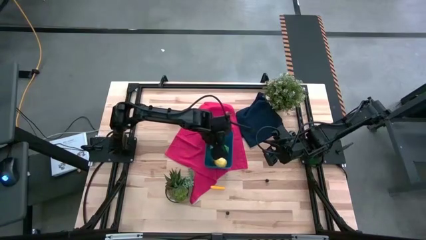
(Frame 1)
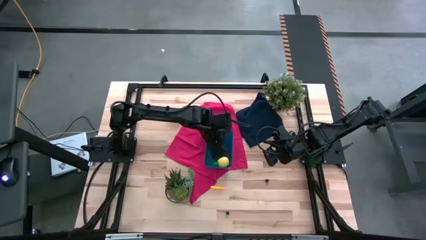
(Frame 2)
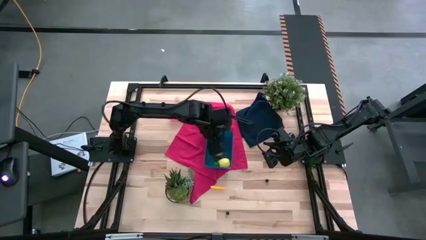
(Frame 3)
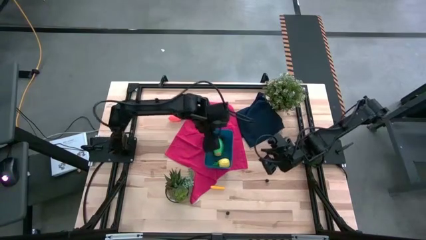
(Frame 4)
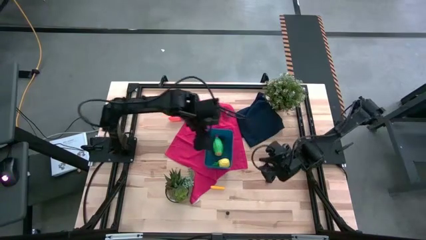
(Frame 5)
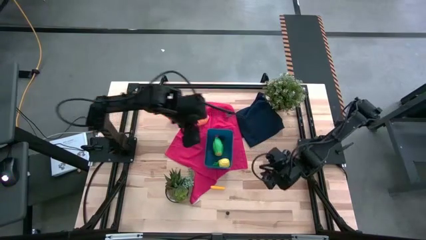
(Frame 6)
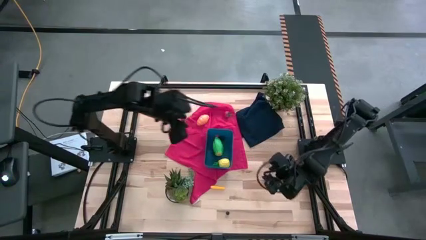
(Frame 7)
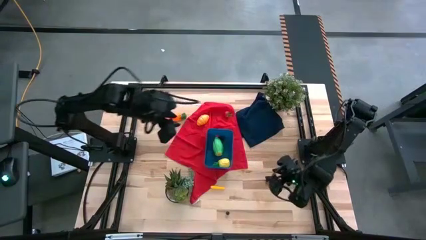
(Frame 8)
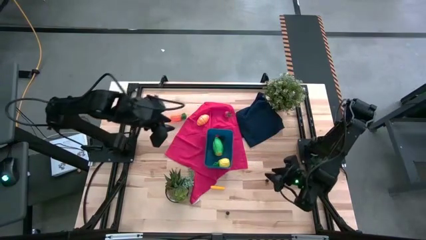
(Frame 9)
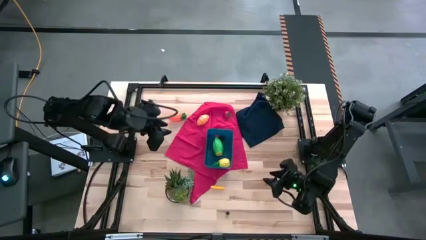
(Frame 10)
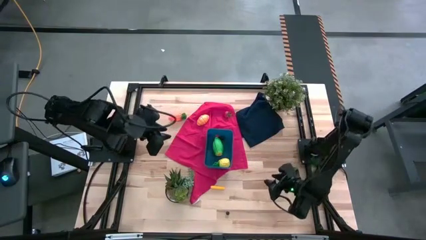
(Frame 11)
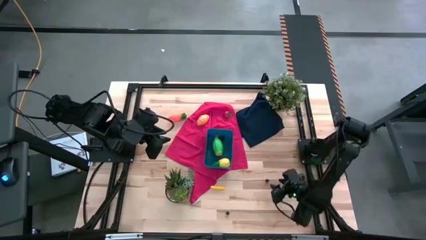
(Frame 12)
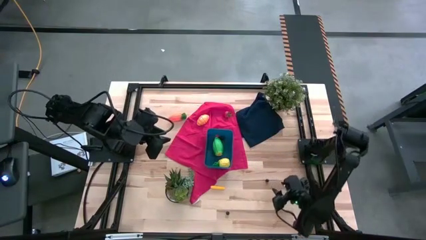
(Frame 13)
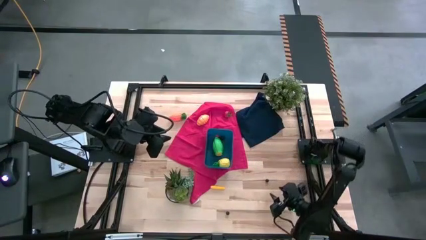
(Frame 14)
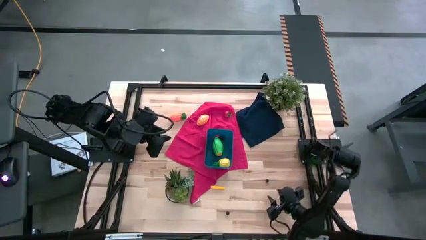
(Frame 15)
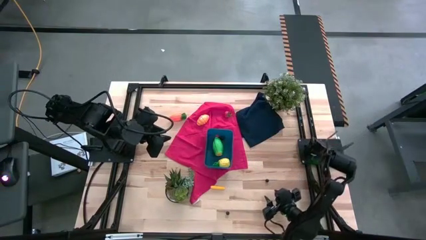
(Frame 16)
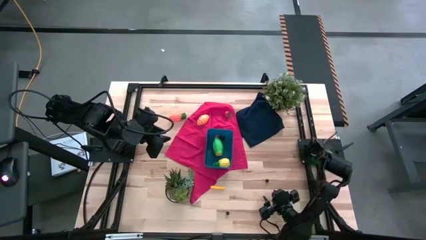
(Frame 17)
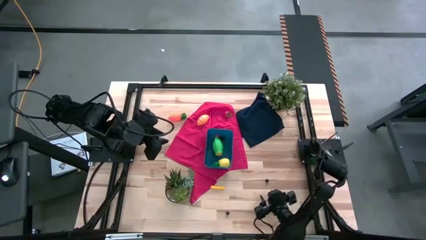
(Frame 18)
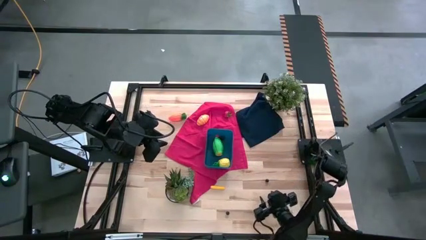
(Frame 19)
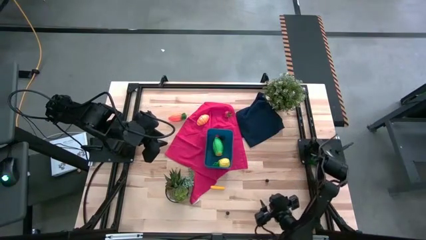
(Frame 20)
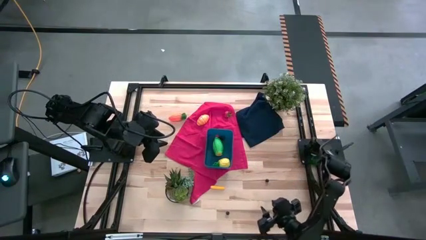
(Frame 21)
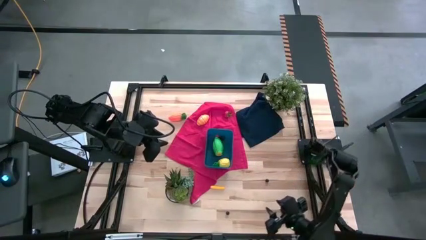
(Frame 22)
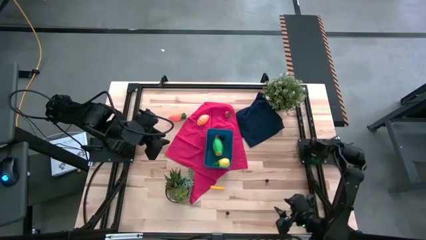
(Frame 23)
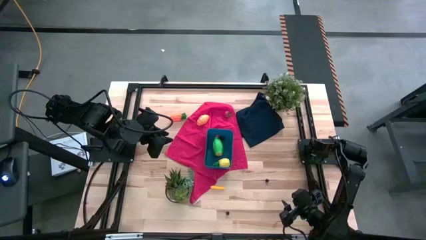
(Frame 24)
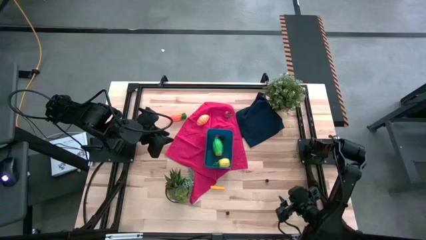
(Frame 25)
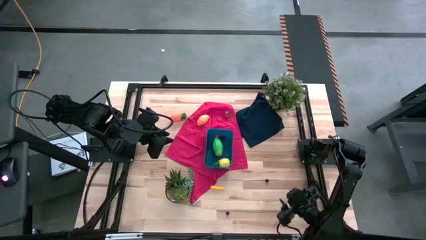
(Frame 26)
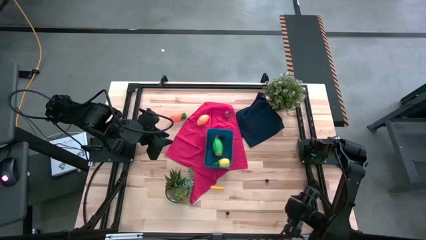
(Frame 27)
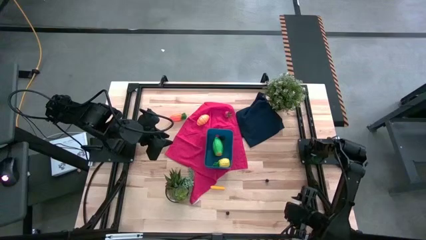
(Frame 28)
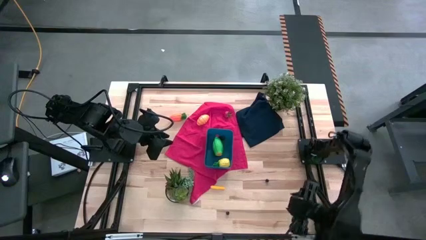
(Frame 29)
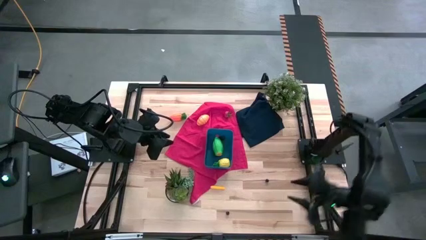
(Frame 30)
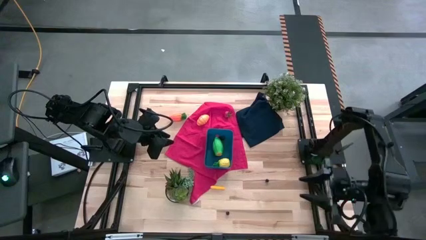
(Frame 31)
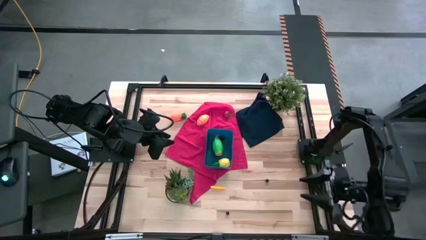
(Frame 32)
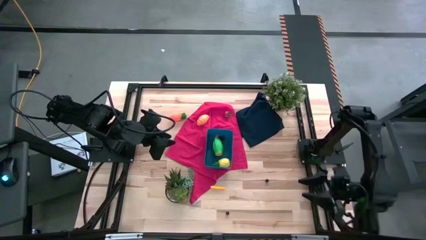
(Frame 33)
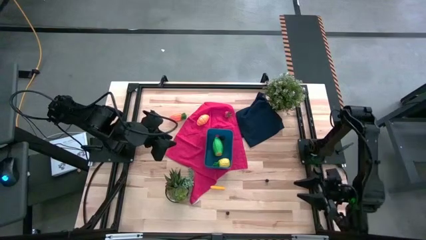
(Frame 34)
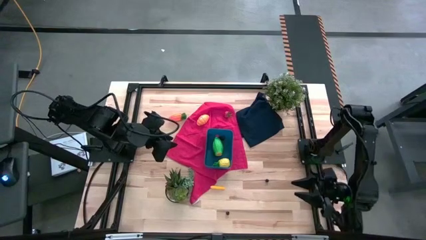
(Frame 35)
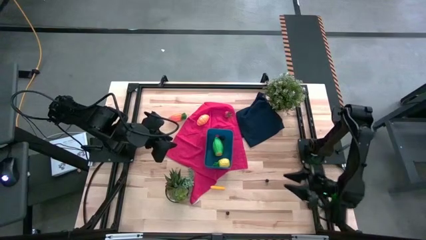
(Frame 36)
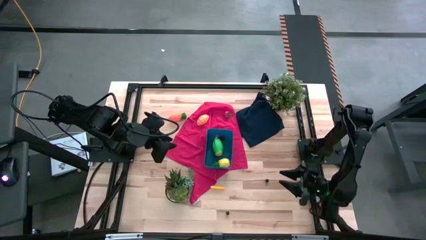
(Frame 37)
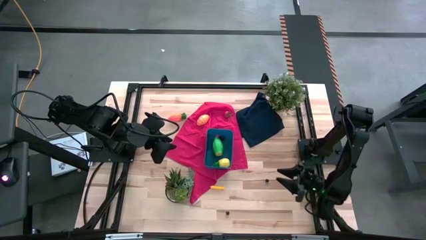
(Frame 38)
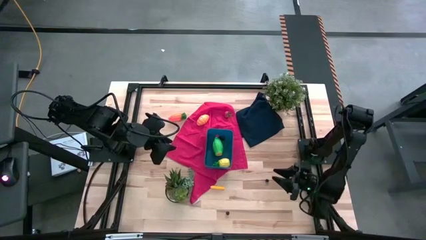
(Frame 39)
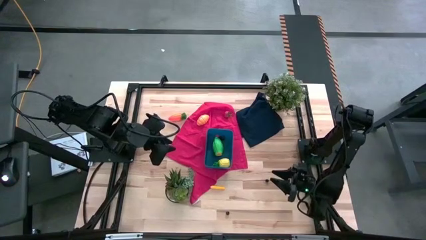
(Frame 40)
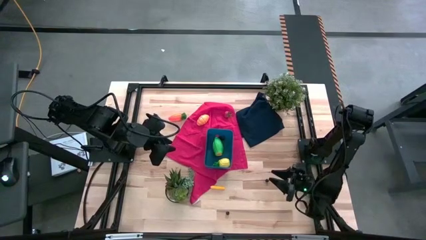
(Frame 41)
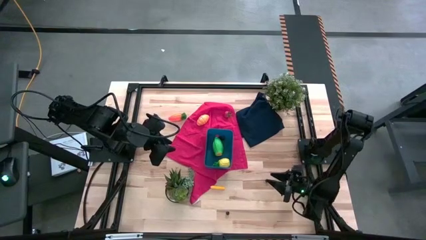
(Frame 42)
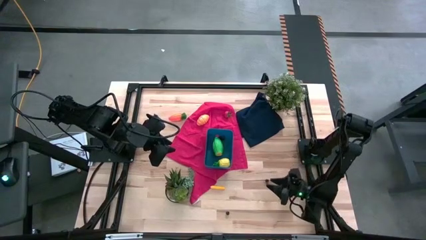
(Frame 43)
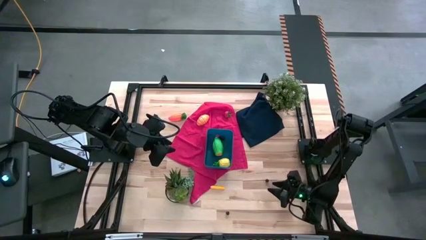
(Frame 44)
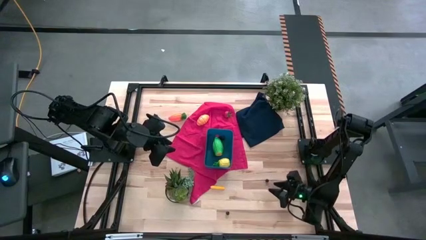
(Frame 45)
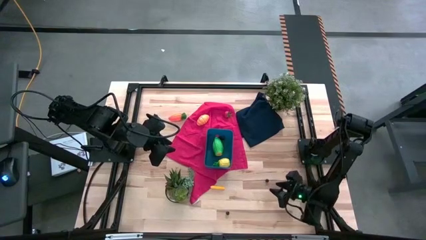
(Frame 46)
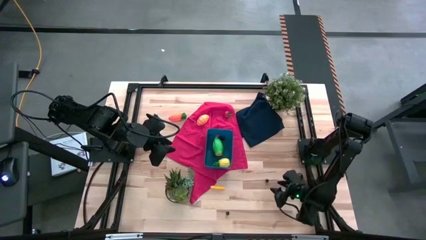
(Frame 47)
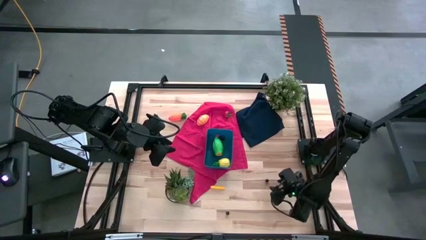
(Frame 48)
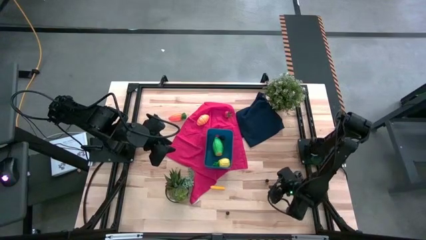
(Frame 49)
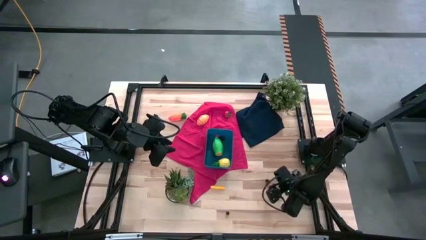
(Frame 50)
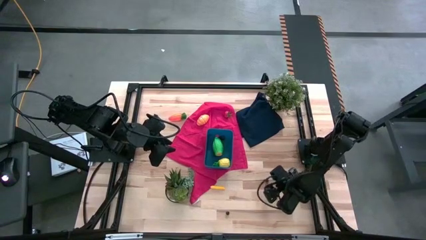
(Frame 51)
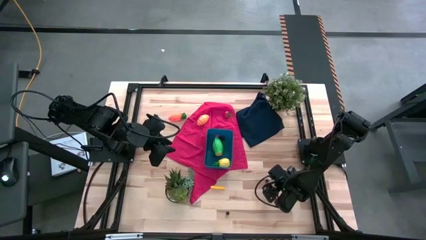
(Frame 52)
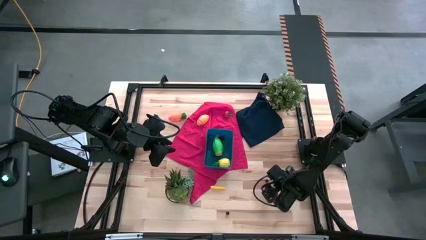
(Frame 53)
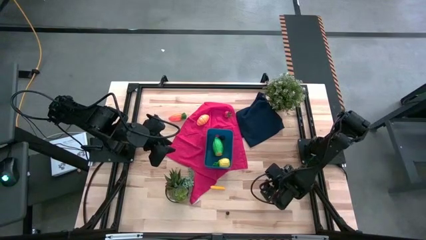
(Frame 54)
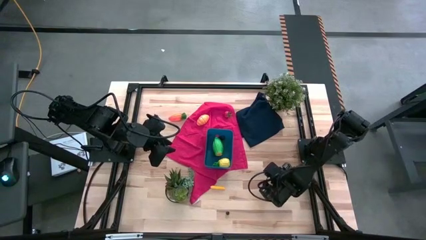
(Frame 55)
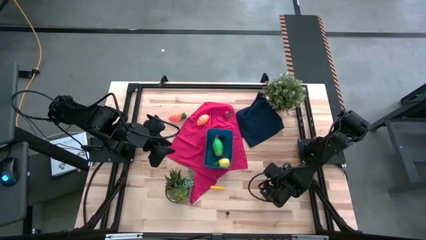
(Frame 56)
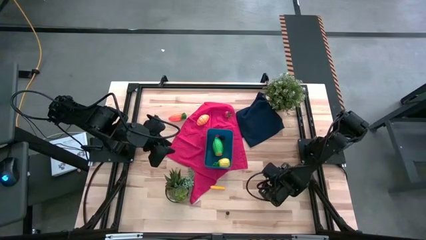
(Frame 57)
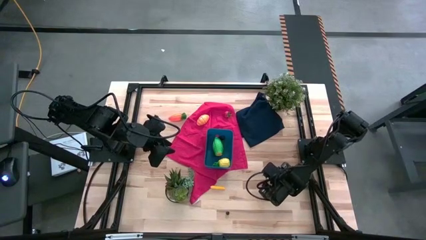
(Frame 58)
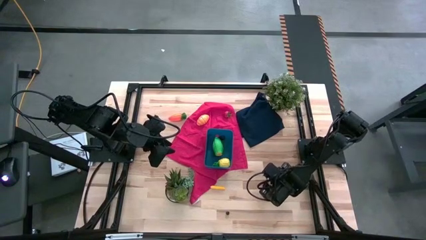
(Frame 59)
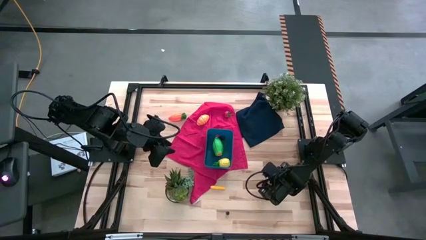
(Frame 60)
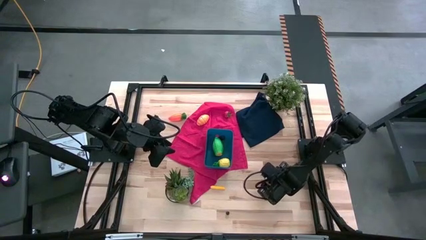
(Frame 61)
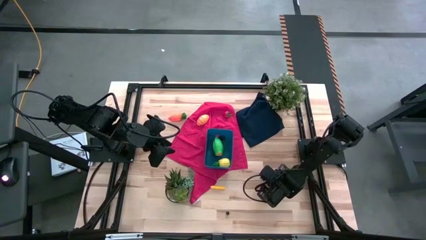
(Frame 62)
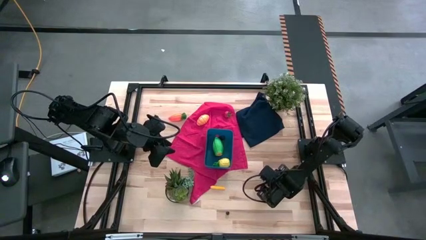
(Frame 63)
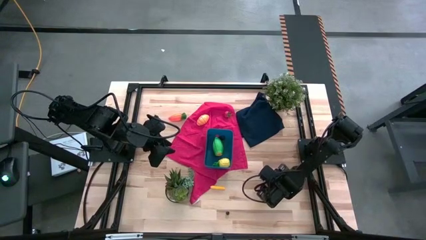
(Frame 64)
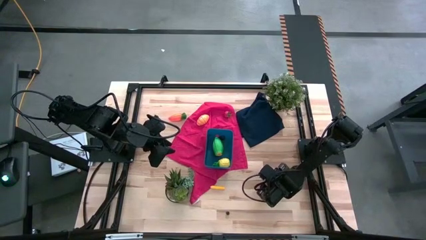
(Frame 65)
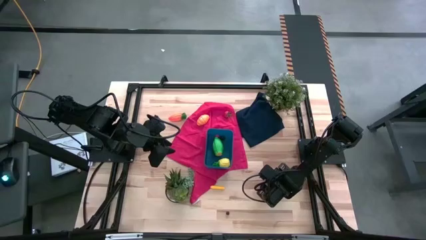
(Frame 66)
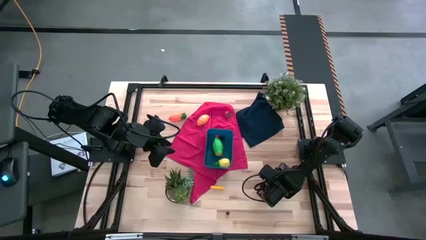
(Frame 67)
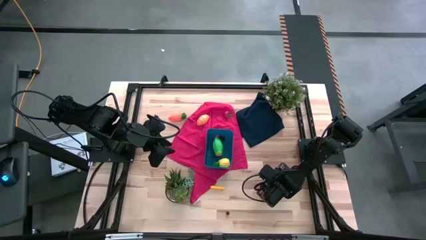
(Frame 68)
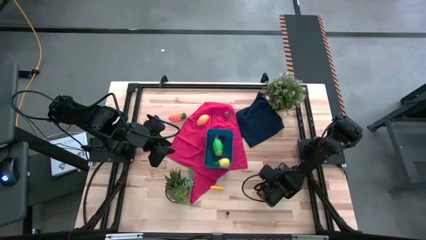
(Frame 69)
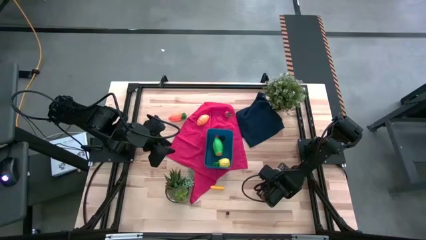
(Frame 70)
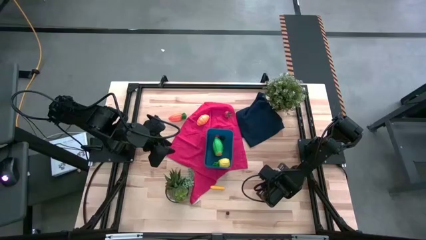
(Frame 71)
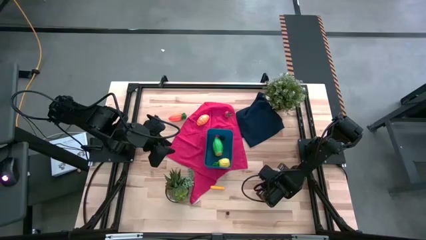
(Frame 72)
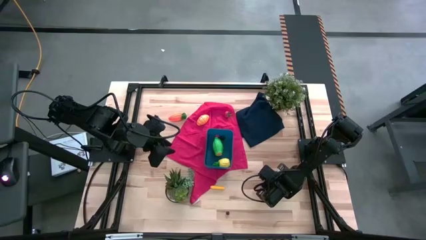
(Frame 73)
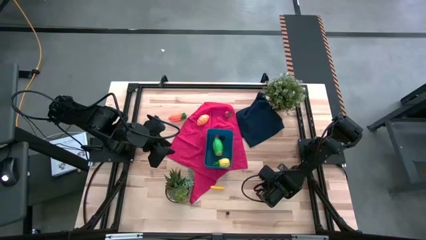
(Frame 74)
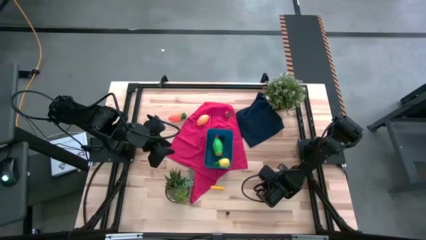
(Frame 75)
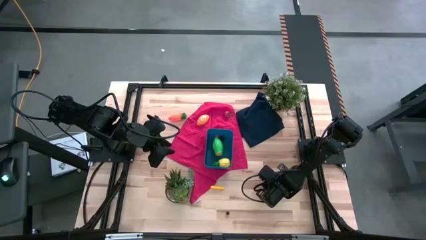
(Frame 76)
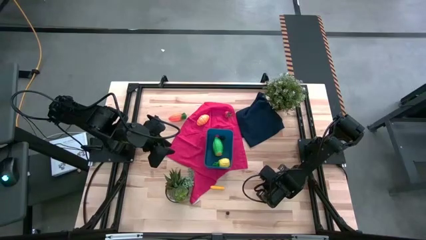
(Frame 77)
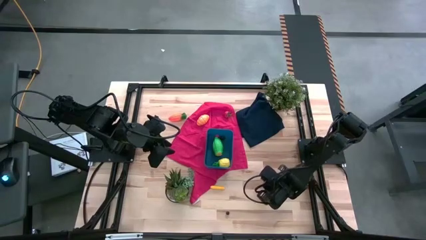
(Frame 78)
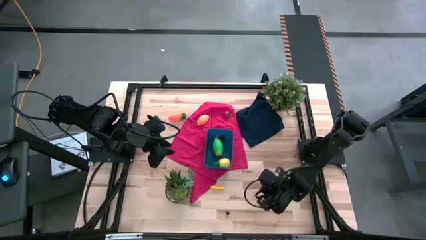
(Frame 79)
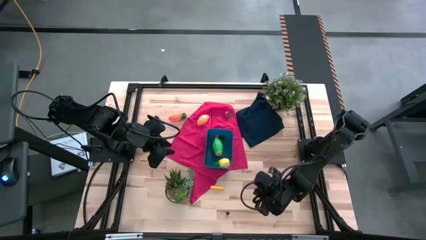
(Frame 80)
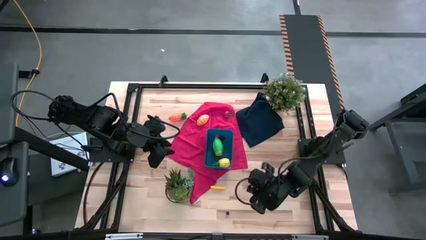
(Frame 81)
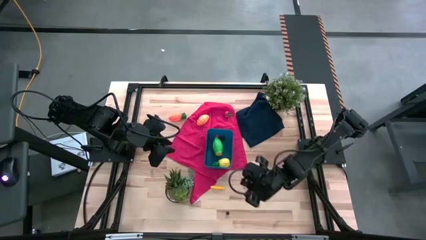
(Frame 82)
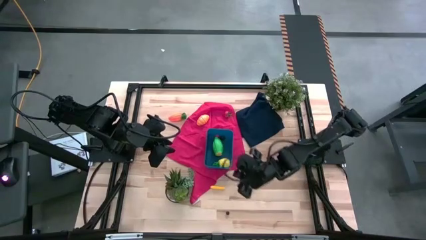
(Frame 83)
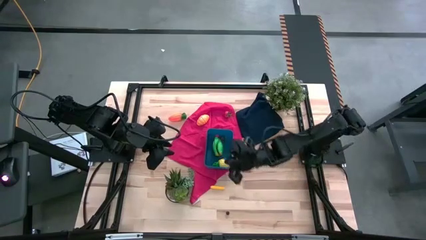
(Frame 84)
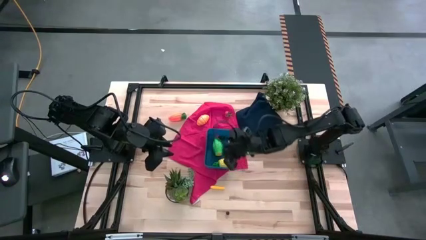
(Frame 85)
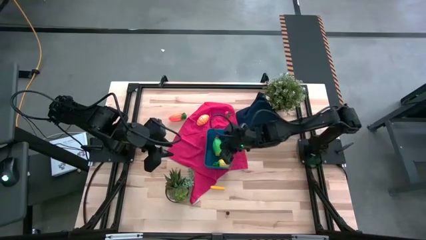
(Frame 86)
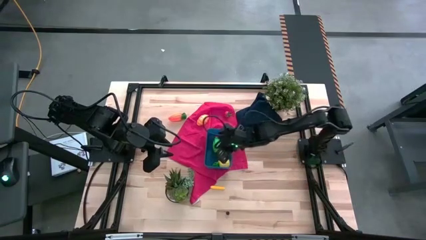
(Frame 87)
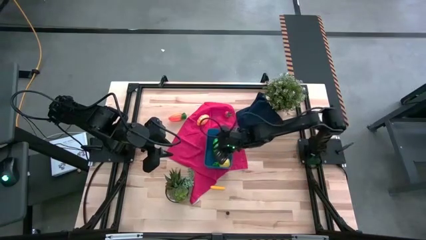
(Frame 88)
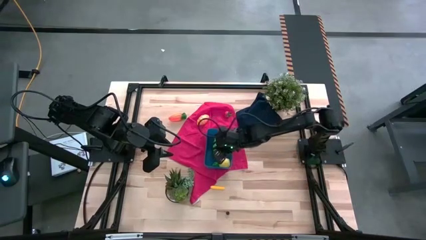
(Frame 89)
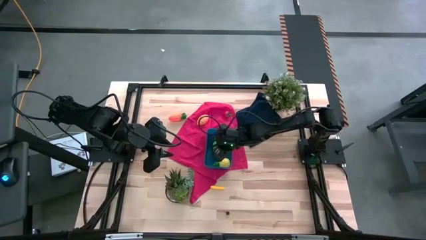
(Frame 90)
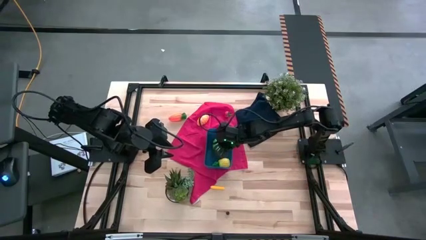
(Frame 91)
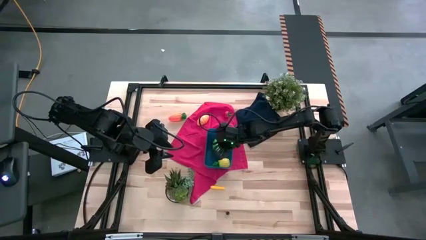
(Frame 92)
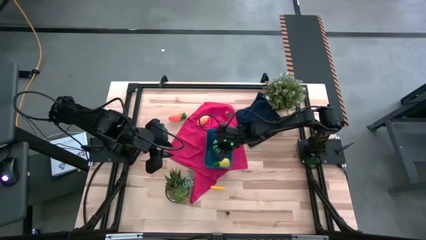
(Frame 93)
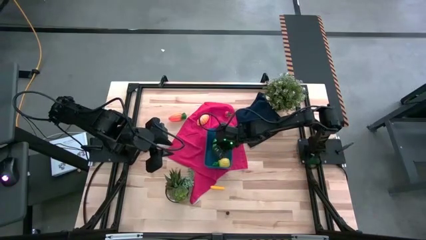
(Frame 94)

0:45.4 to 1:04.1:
Task: Pick and placing Produce into tupperware
Put the right blueberry into the blue bin
